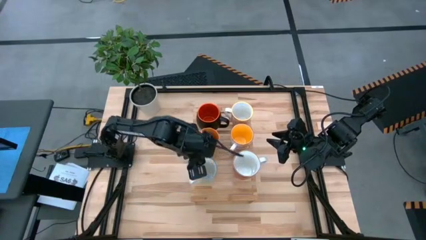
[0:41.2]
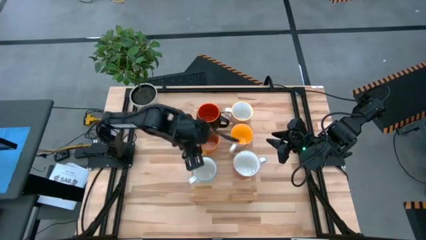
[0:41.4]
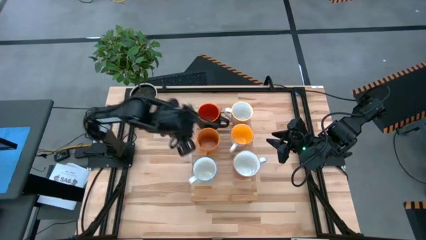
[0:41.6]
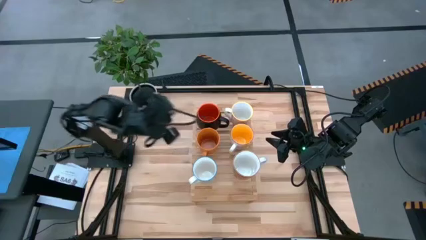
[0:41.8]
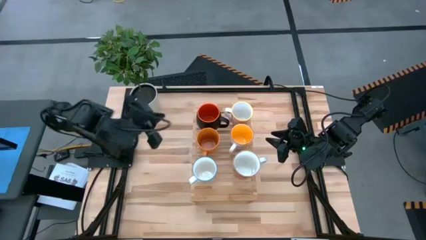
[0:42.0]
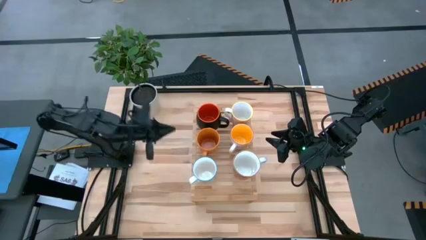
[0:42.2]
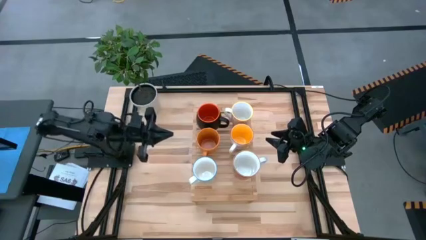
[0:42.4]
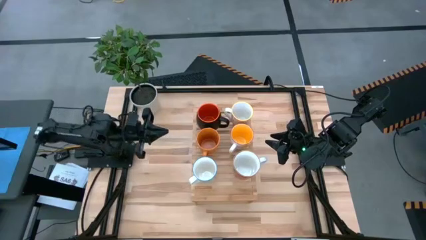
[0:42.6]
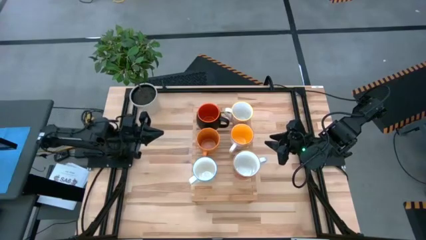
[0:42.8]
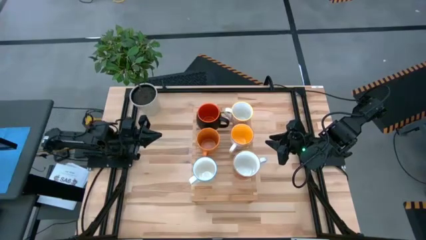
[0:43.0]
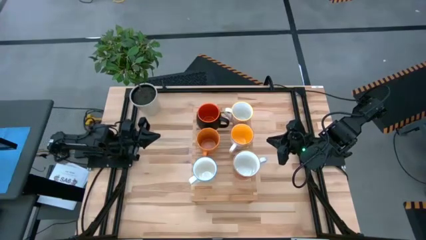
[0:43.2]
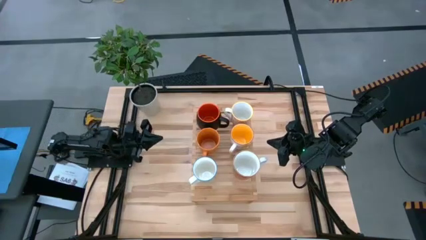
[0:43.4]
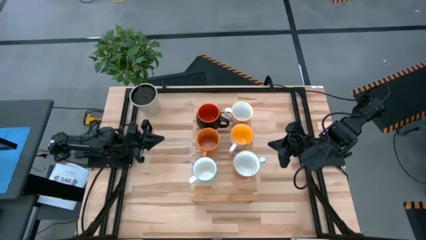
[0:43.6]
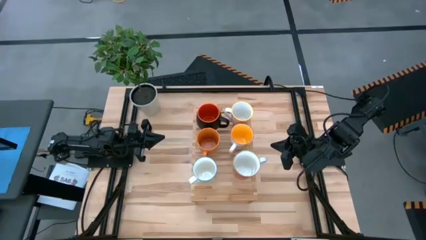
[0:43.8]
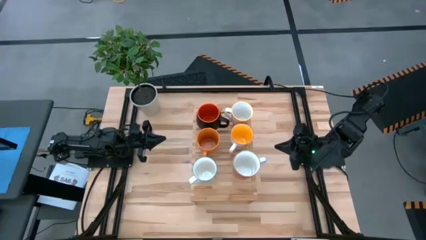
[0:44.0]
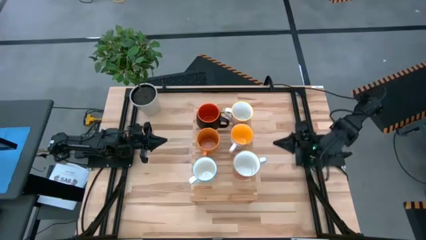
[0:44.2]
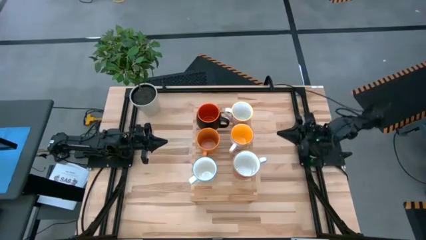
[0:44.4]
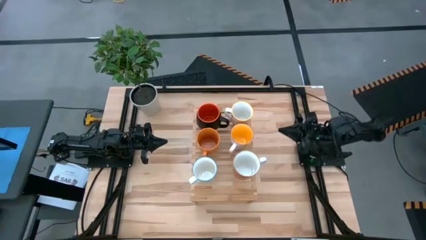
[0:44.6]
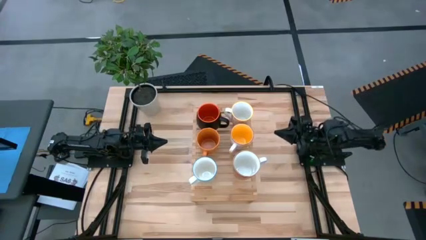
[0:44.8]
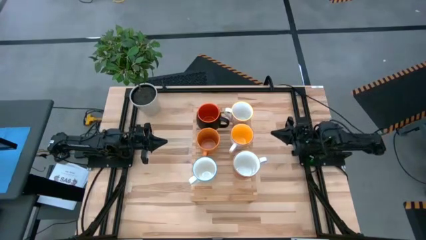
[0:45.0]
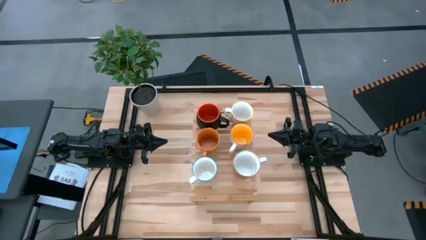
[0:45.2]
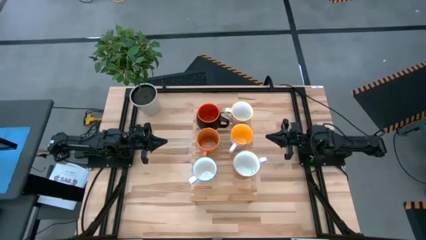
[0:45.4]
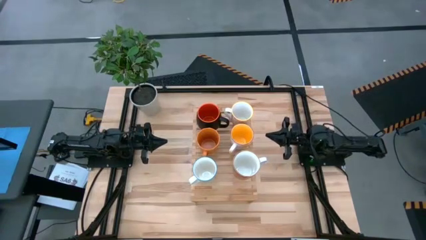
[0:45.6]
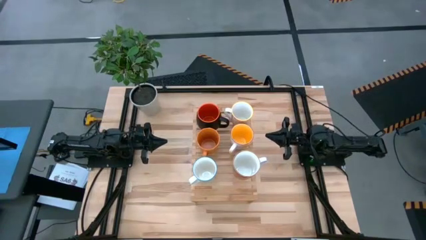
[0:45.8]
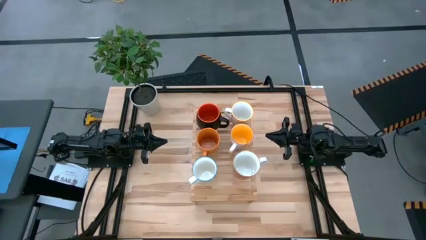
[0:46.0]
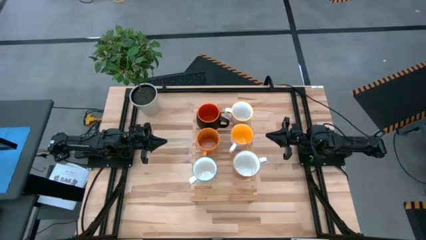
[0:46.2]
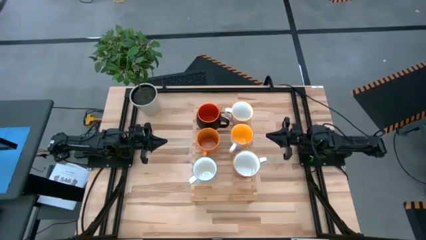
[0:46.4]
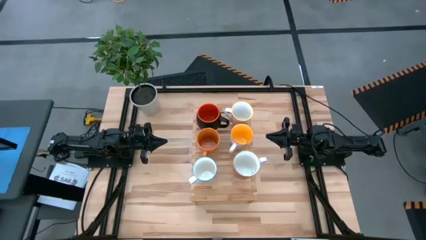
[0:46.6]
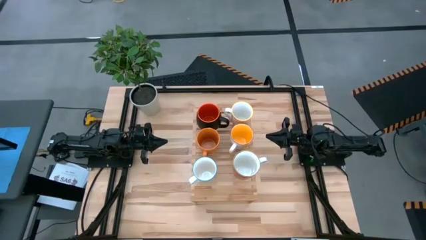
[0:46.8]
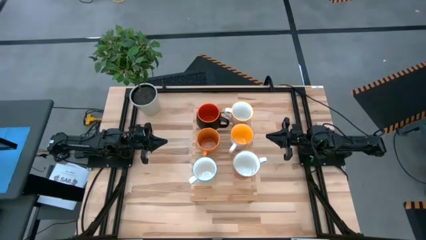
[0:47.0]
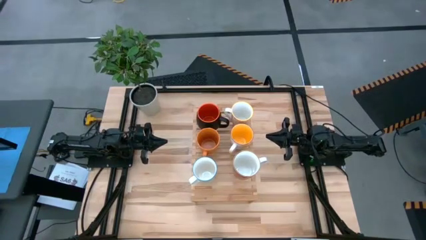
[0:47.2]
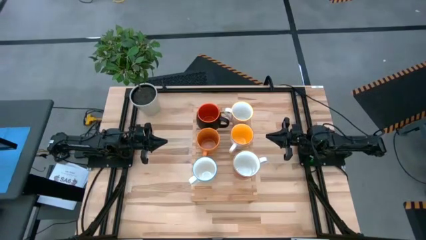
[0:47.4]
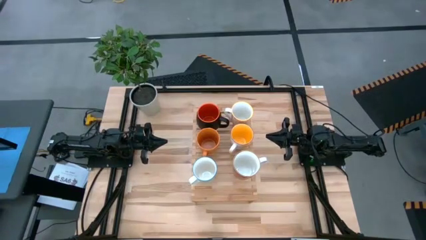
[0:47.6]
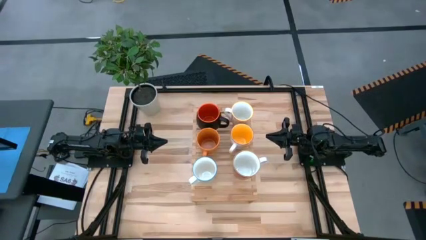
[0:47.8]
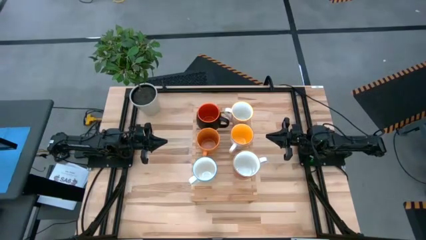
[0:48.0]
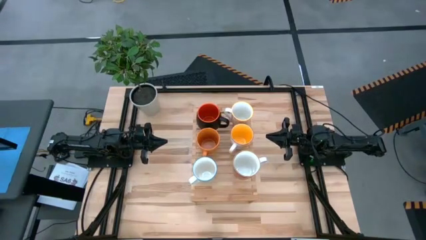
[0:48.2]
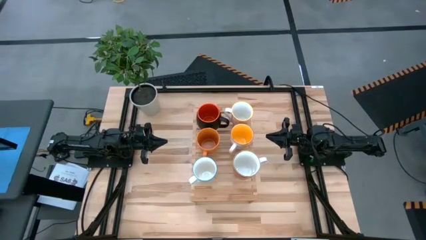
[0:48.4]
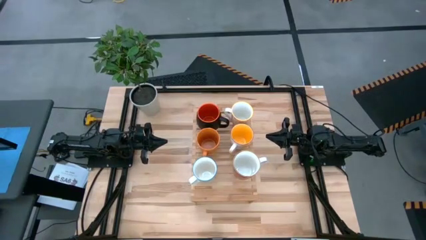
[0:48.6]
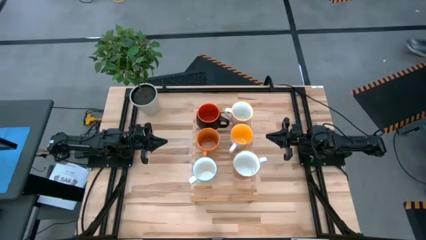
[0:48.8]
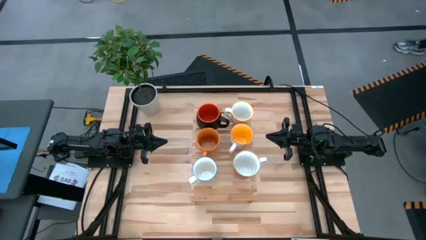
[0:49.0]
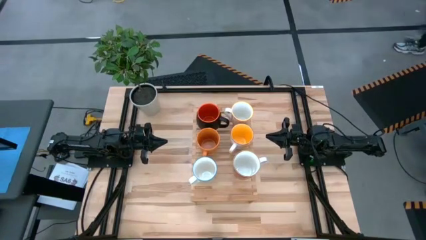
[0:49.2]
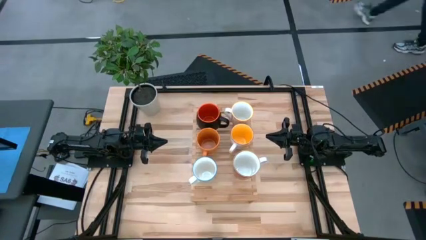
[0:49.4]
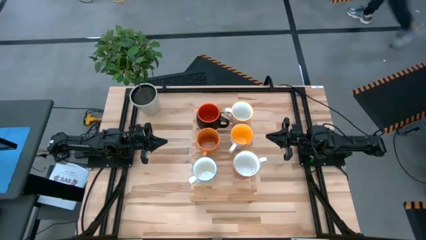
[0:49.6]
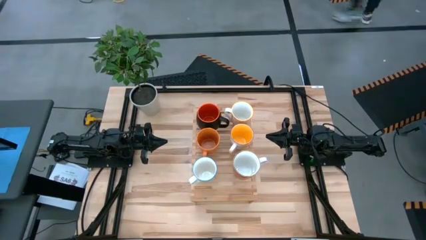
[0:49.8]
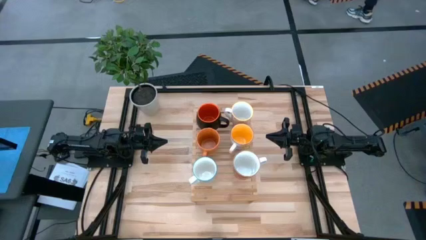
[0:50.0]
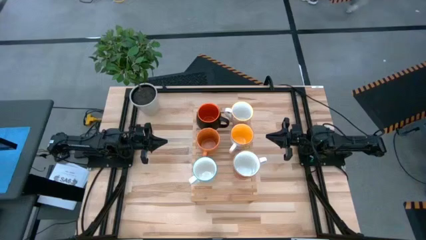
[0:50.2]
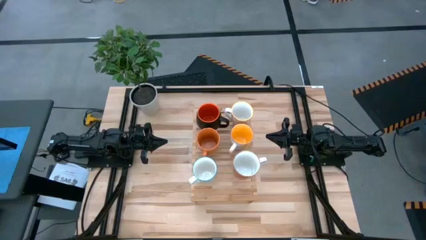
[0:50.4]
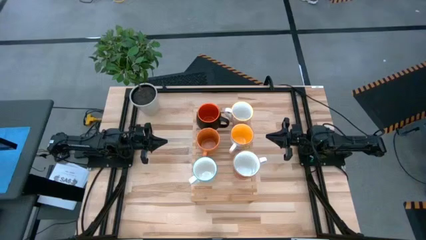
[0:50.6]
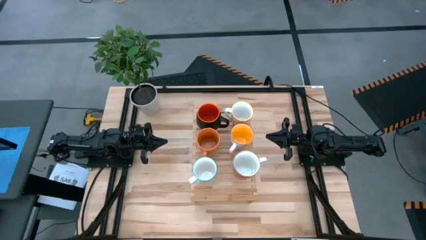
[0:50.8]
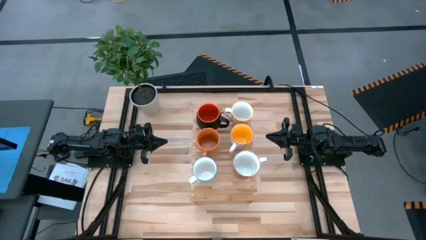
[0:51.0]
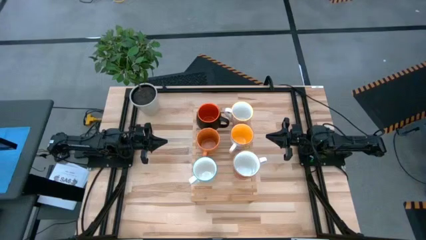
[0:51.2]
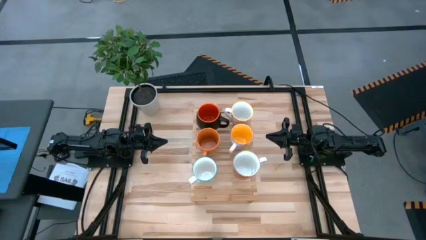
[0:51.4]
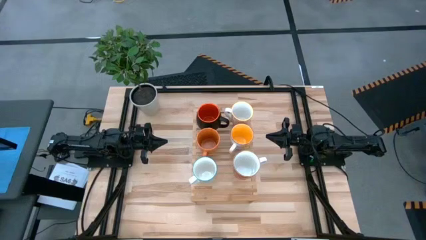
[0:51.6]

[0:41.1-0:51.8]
Task: Place coffee mugs
Return to Home Position

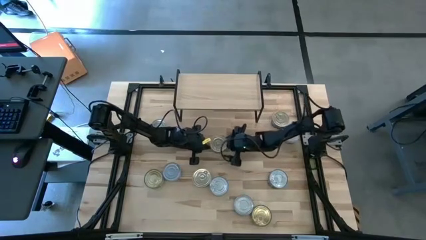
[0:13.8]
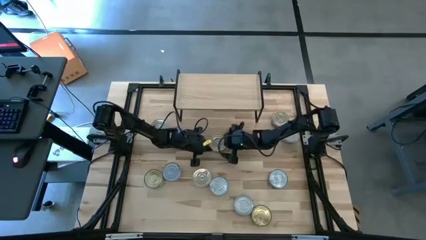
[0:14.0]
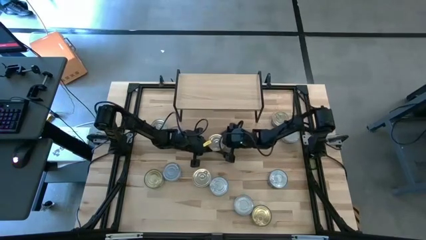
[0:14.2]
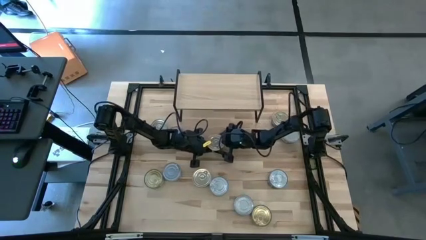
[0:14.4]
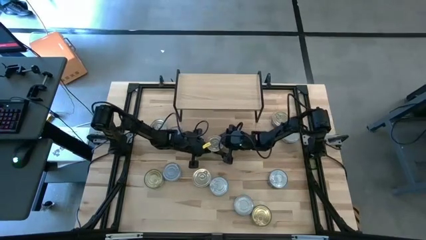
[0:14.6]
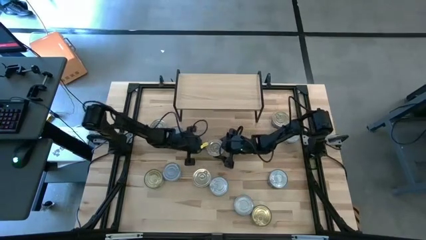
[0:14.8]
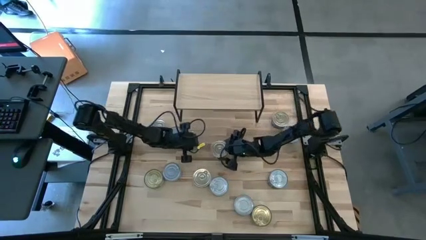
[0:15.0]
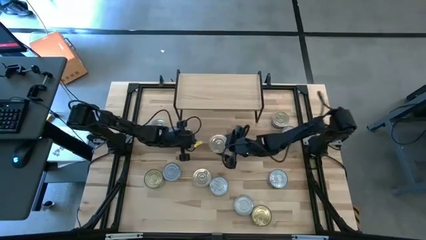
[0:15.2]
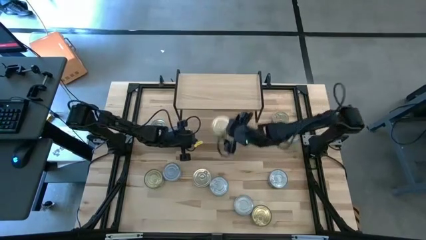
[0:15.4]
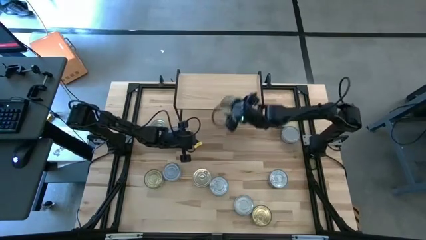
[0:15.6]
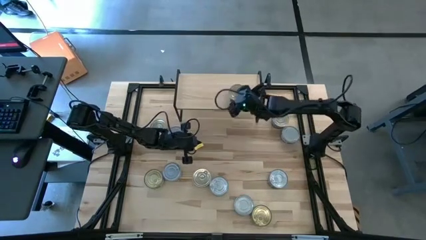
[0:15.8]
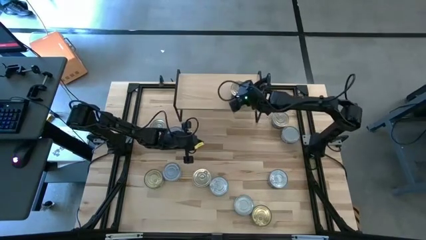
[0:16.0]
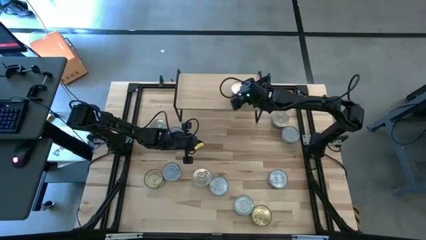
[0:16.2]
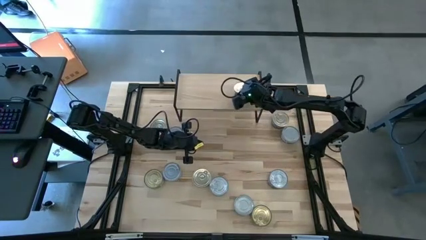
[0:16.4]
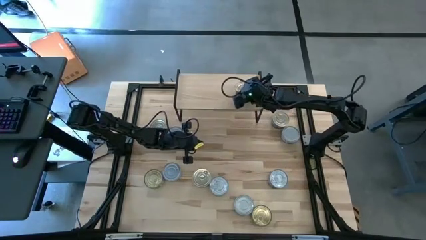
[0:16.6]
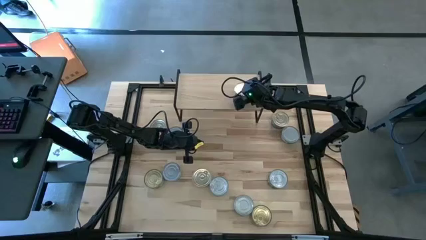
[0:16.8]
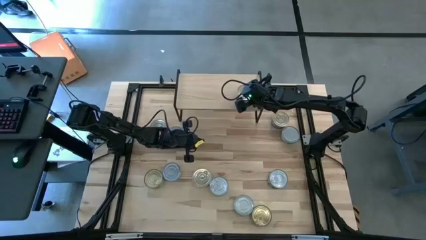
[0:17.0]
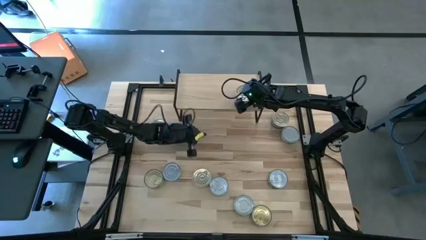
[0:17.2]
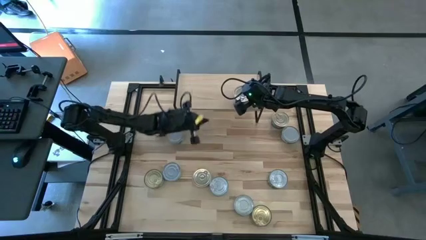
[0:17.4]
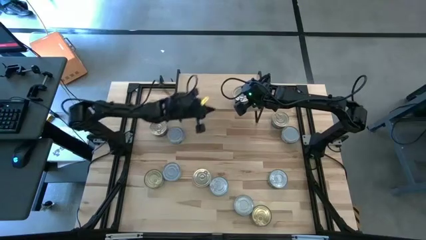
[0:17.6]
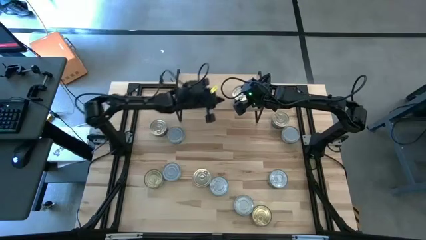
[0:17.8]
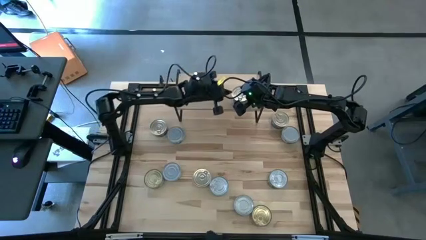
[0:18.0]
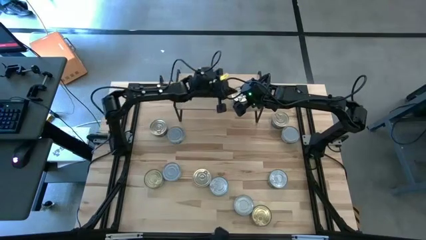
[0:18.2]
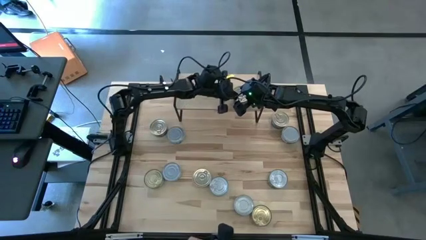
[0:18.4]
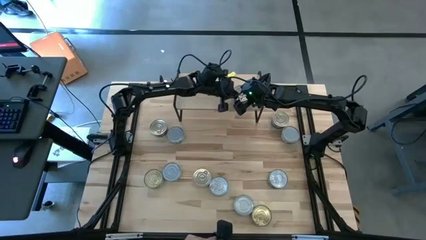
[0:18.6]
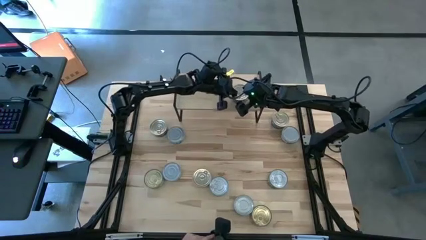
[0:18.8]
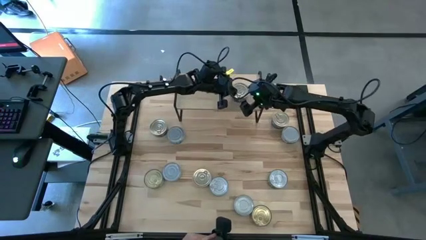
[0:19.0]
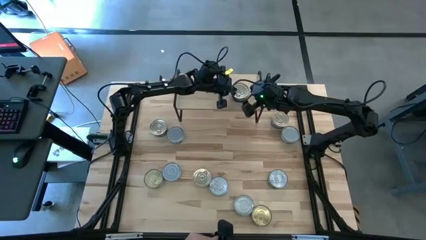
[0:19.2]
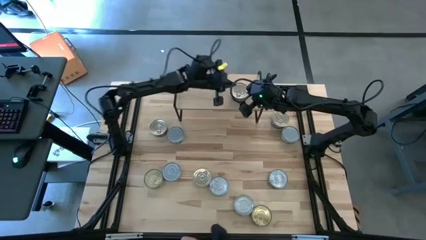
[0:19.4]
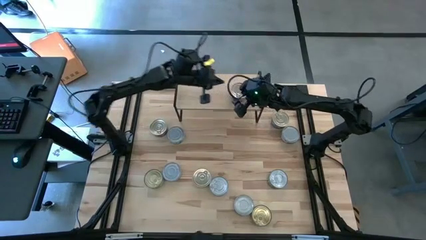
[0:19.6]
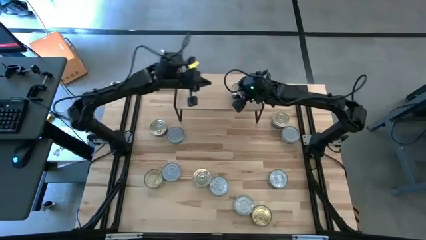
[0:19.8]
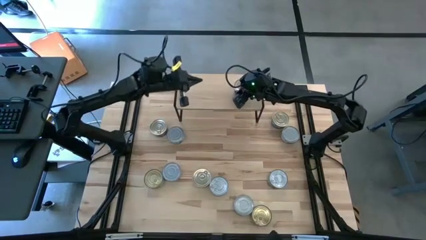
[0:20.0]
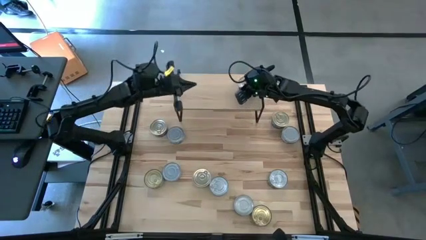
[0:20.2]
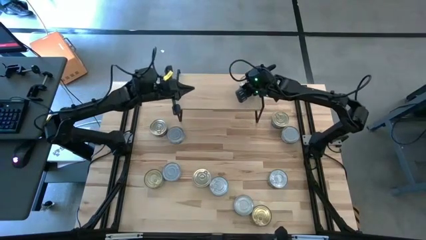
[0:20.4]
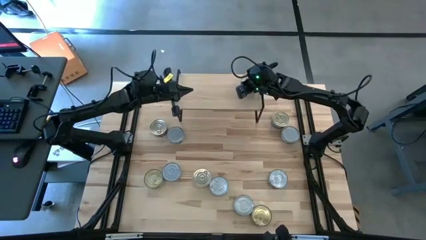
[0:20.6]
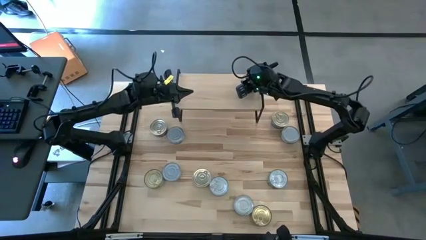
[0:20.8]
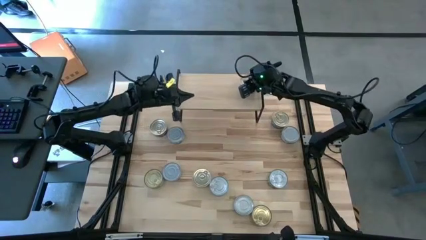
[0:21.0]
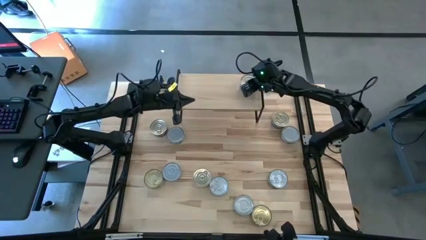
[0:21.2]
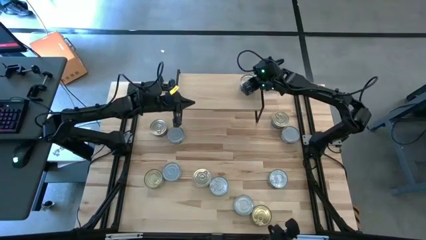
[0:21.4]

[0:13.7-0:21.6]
Task: Stack canned seafood by type on shelf
Put the bottom right blue tuna can on the shelf
